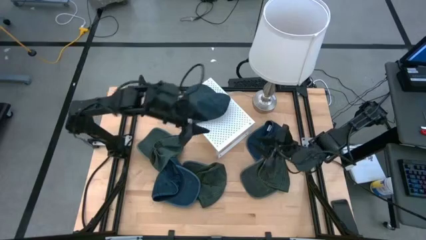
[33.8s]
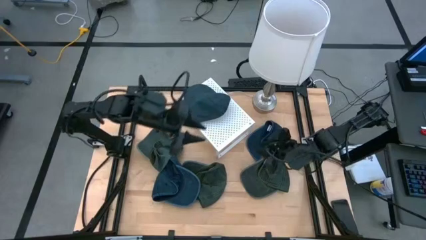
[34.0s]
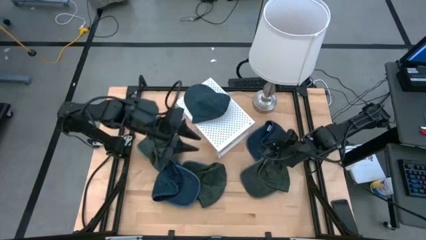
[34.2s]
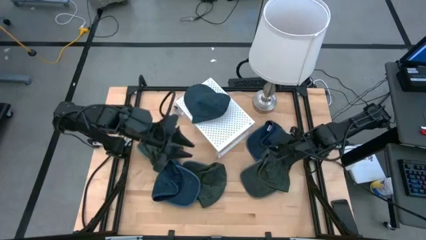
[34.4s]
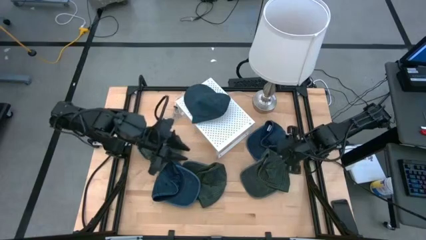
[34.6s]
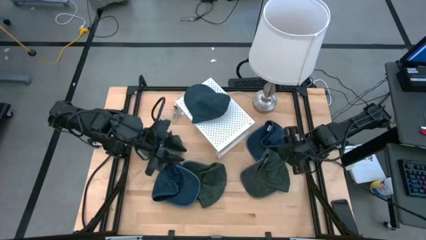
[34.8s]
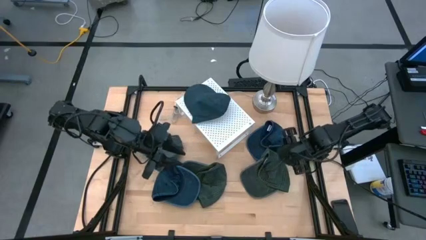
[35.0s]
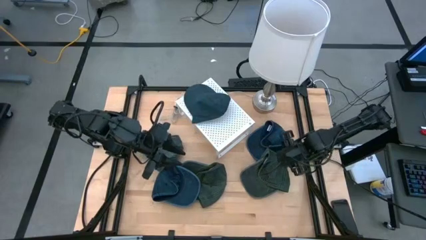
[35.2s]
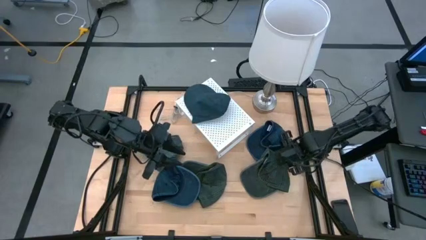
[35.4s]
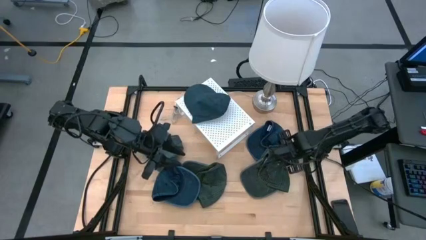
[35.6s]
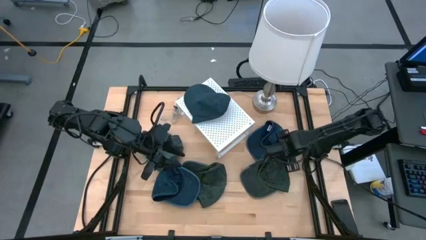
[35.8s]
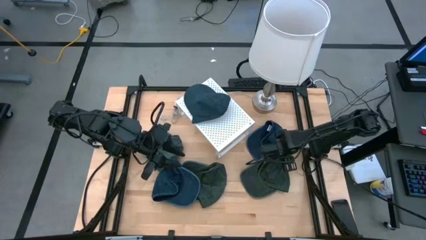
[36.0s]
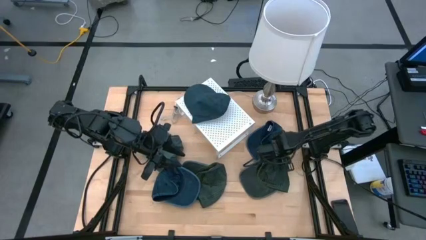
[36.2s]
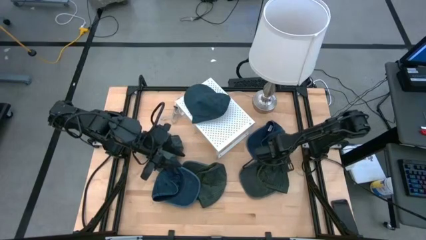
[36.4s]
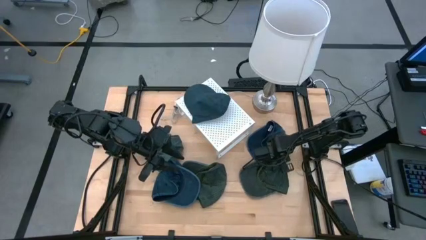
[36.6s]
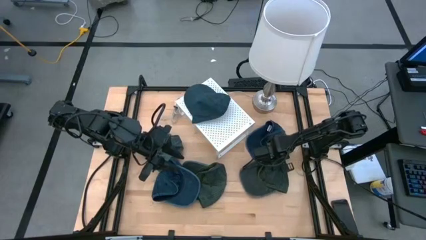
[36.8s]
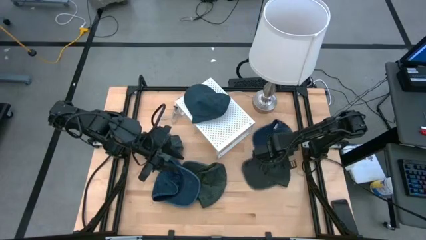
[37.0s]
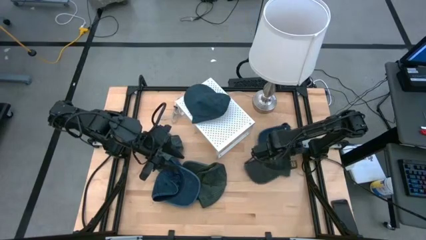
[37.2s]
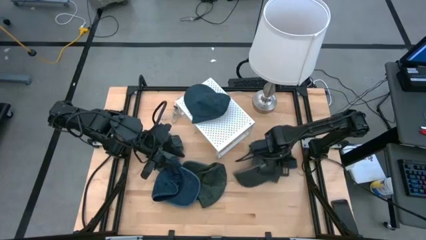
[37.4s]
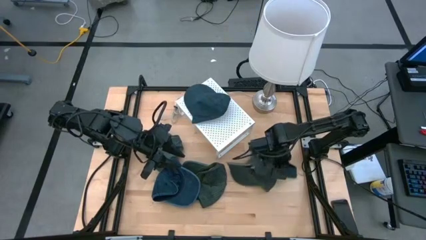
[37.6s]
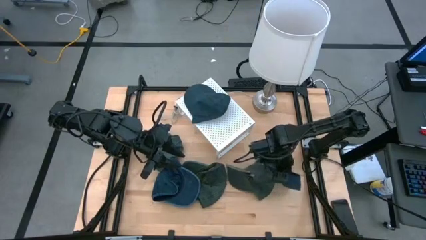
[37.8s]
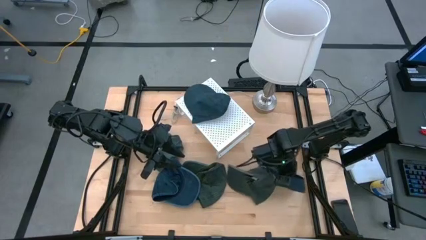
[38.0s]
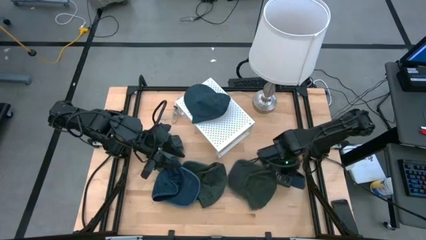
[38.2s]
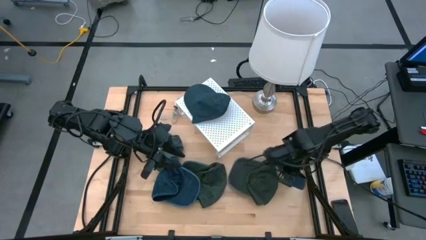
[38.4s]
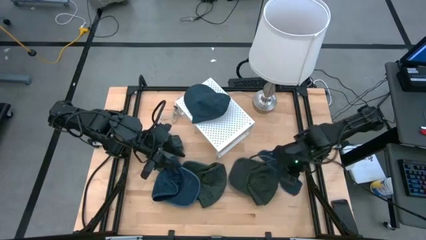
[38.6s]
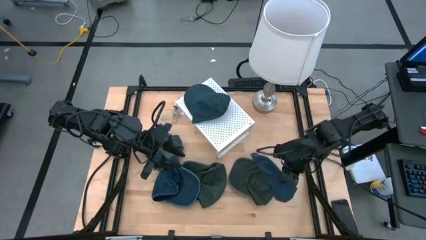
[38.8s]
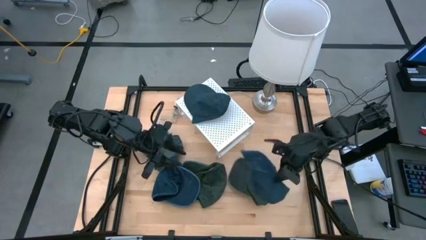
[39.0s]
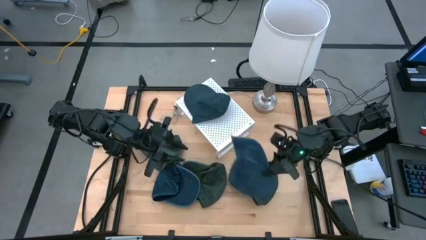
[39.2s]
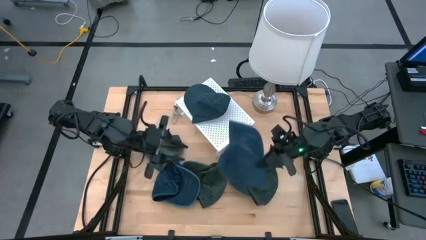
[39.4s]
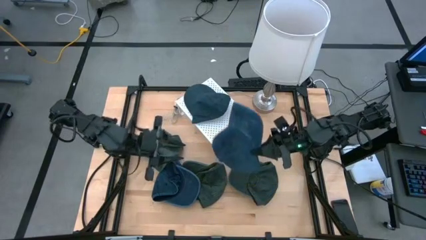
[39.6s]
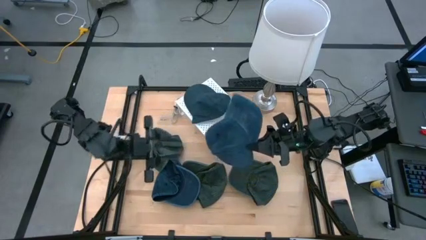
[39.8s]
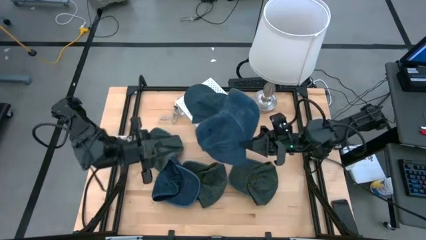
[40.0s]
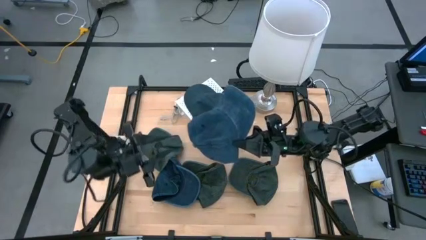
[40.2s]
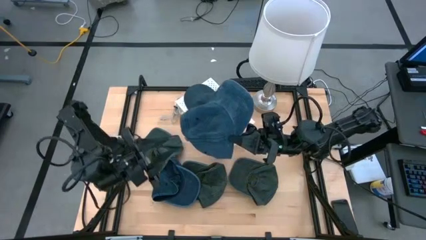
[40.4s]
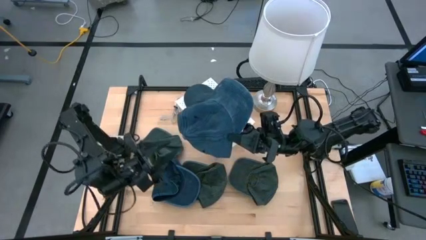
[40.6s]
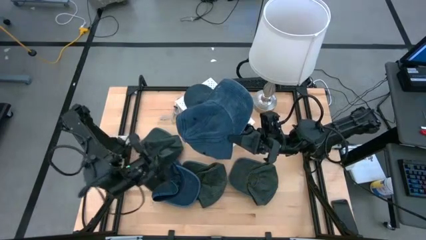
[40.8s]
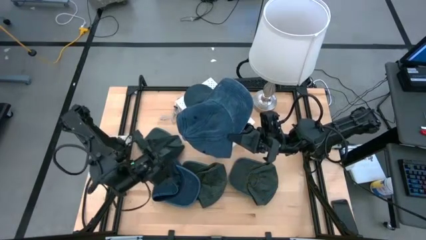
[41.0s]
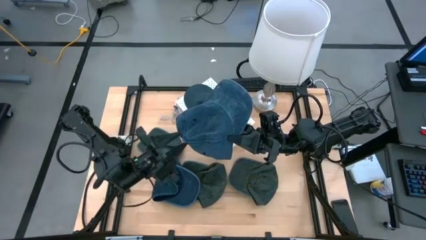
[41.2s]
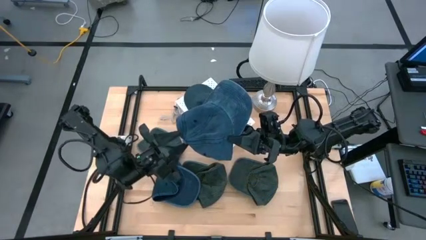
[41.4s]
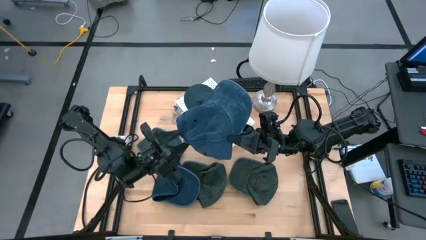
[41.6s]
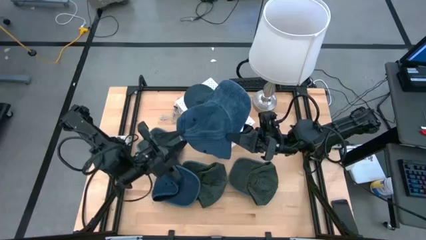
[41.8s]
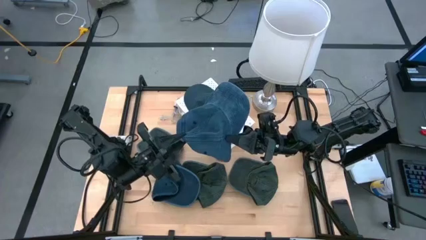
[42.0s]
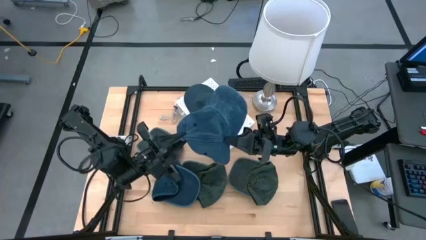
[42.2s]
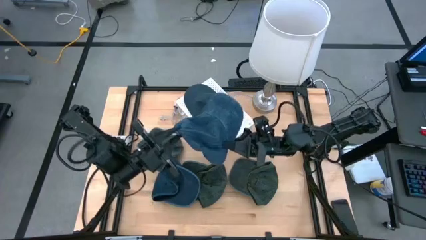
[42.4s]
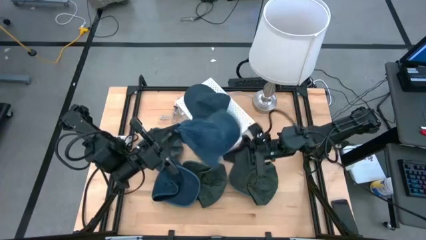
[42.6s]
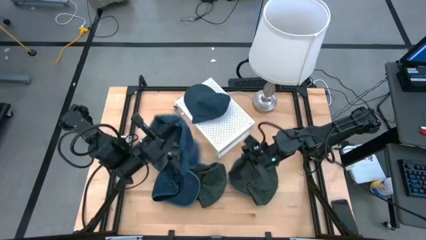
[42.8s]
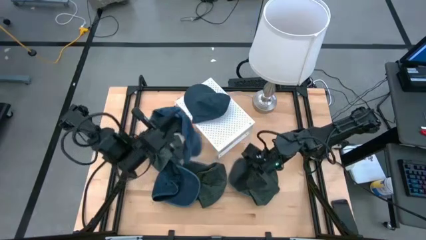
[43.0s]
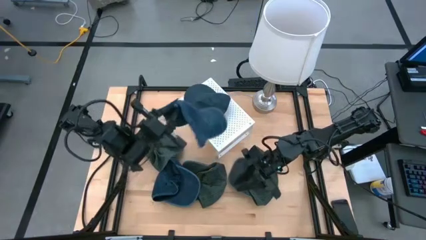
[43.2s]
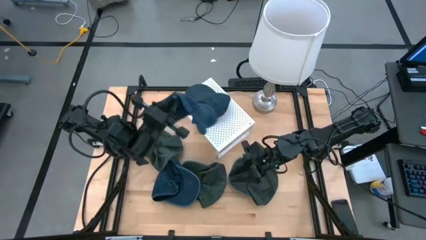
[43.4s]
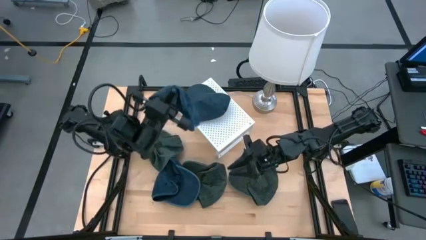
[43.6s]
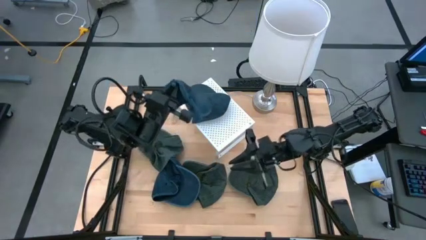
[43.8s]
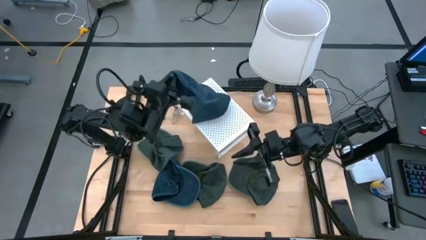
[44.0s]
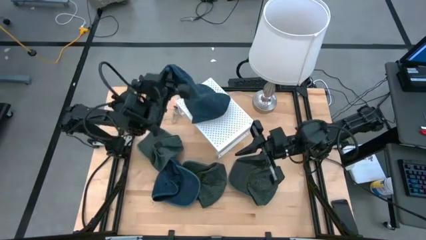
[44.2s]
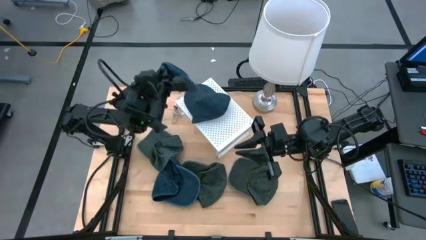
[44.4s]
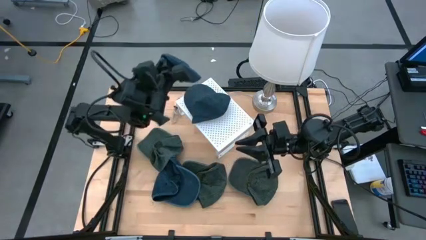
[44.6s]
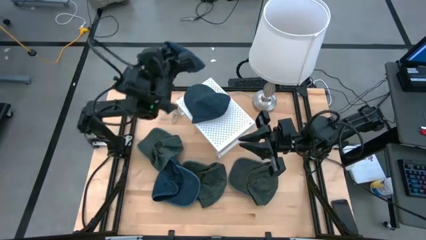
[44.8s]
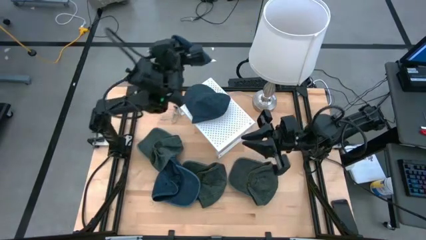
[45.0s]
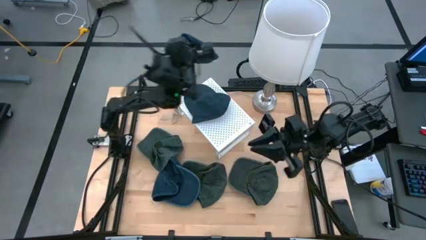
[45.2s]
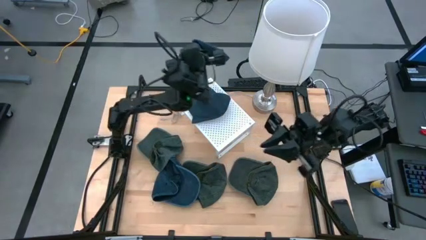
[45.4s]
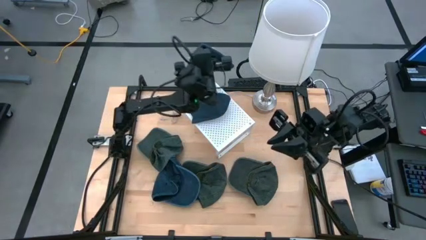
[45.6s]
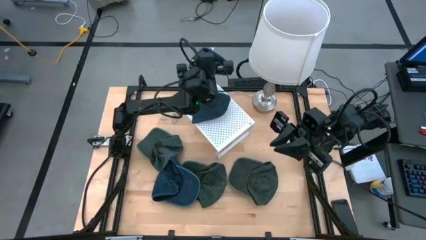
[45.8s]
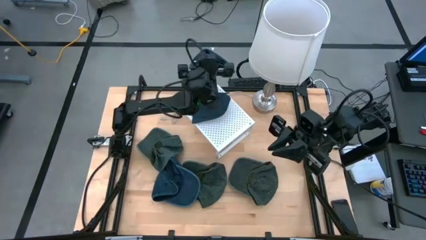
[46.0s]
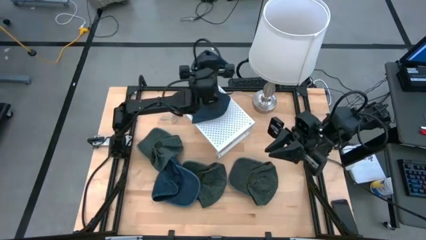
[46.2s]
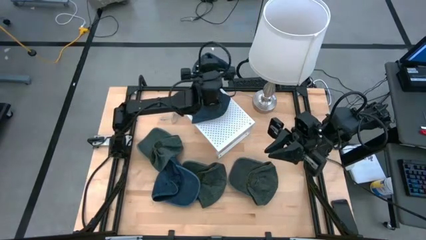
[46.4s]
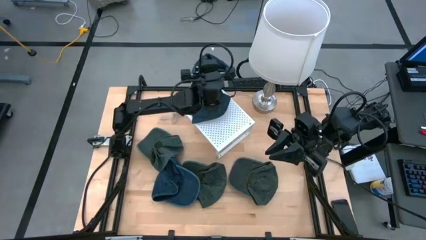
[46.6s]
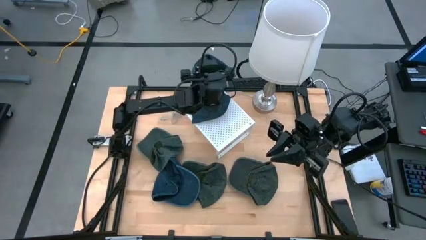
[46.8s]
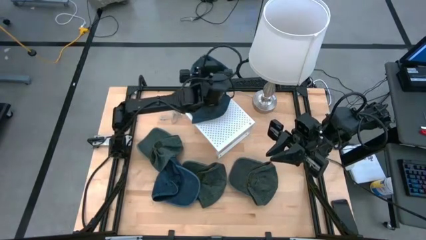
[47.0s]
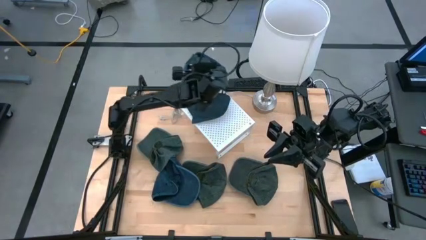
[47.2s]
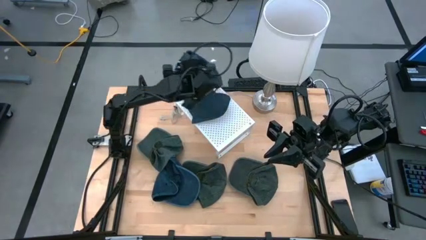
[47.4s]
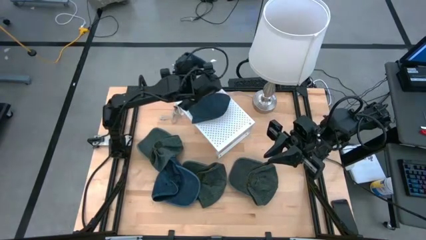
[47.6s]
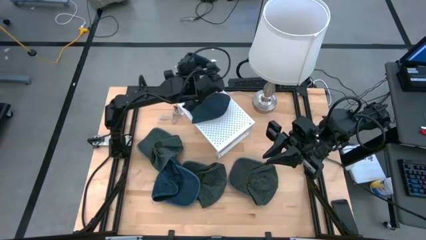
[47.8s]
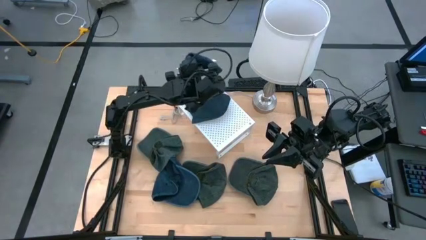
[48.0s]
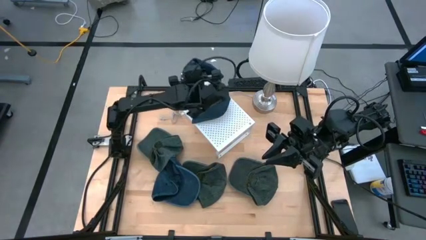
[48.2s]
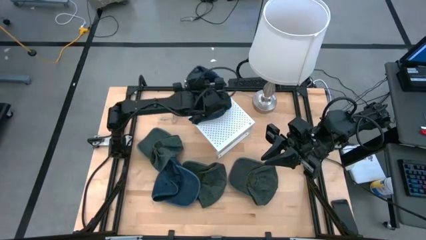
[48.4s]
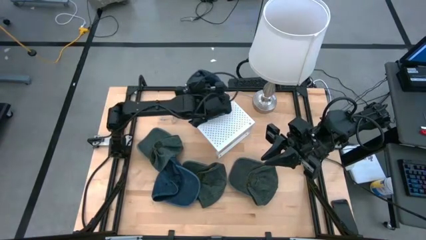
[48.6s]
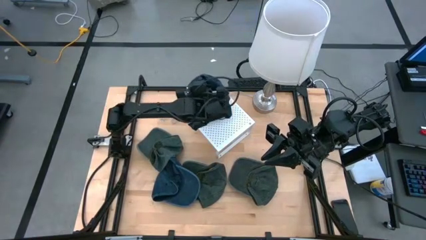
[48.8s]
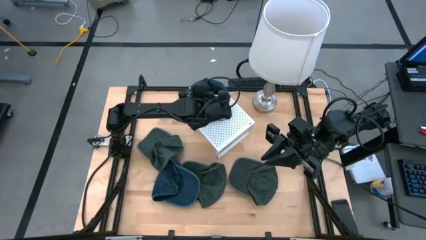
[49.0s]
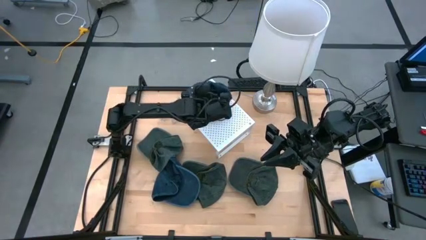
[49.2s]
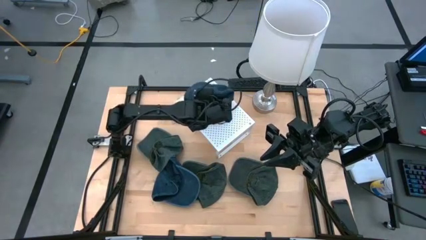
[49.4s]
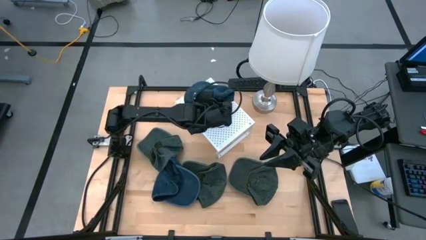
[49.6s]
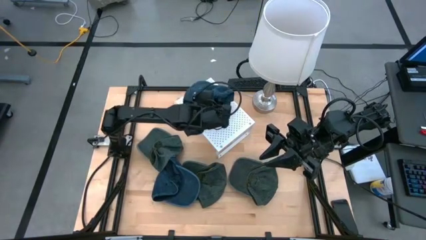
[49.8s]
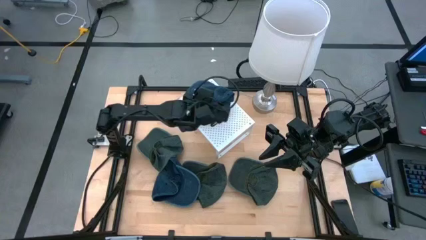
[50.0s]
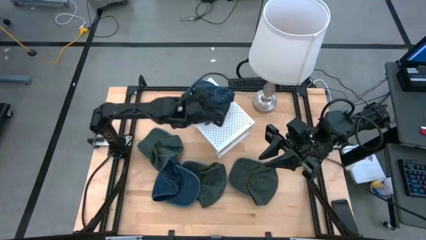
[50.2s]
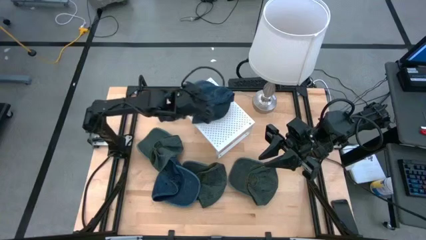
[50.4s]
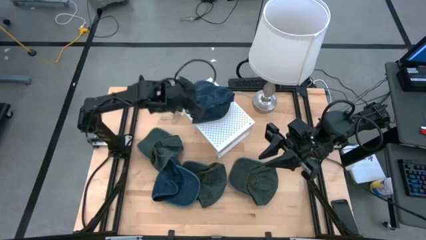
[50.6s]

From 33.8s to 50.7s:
Task: Pick & Place hat
Stack the top blue cap on the blue cap on the shelf
